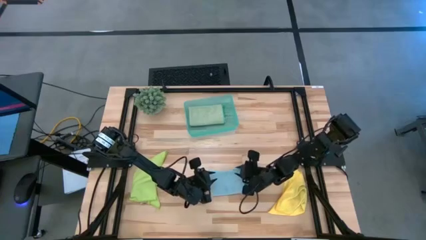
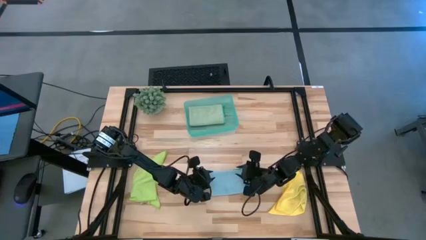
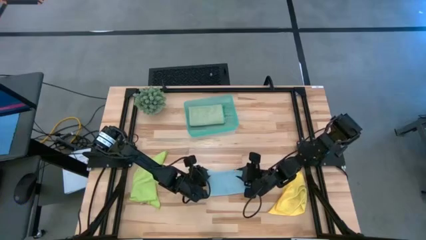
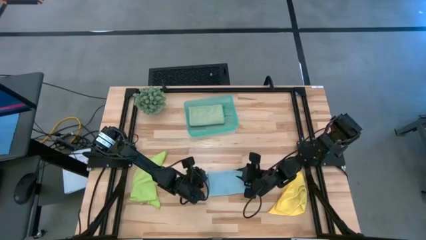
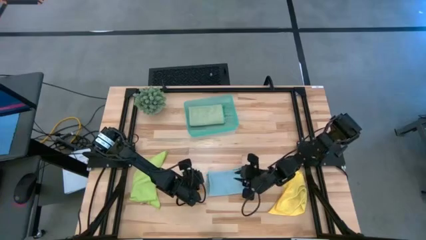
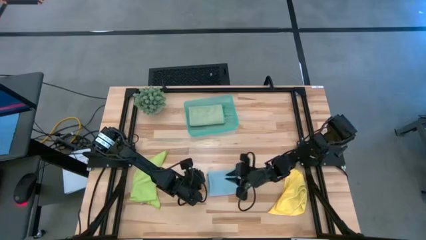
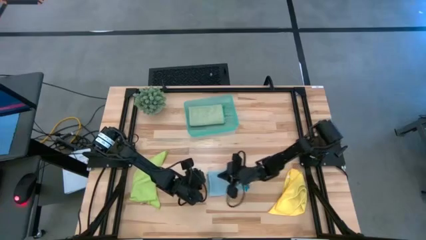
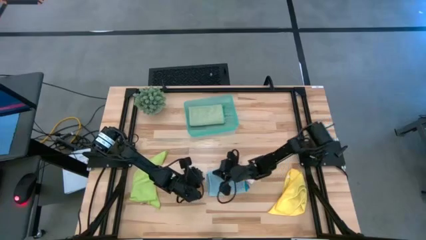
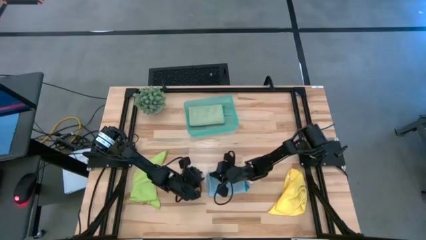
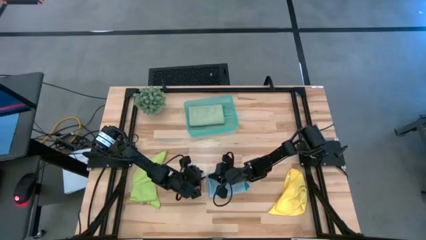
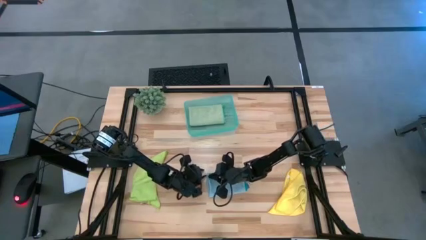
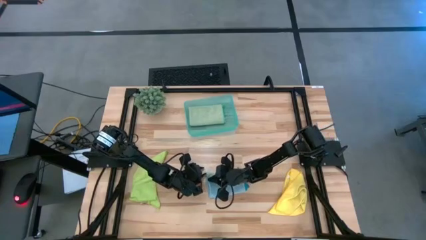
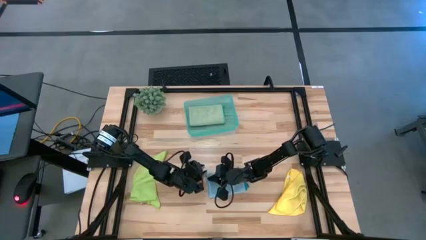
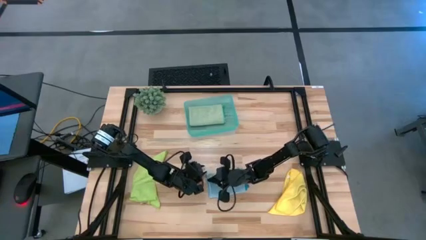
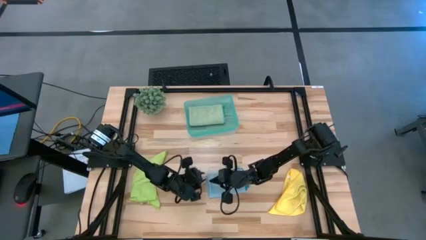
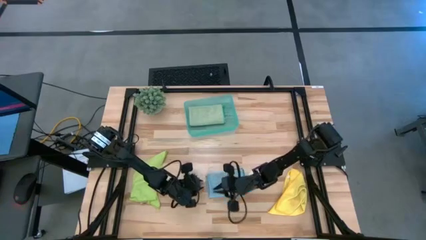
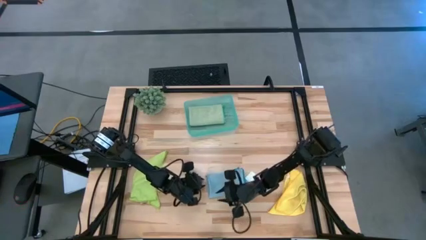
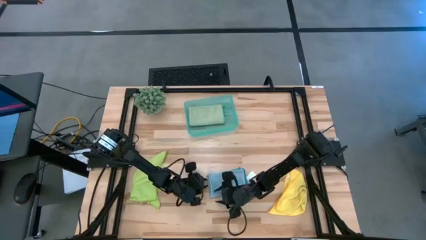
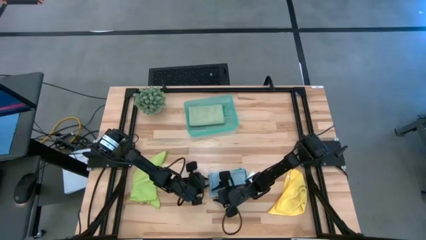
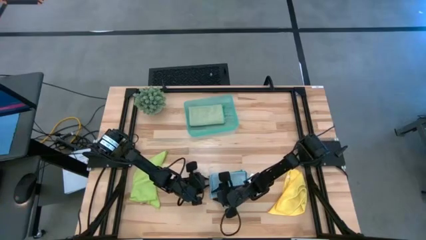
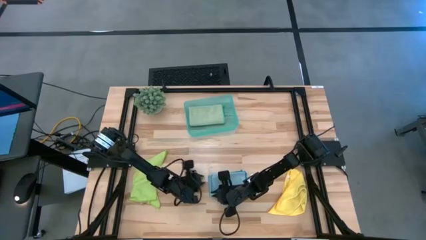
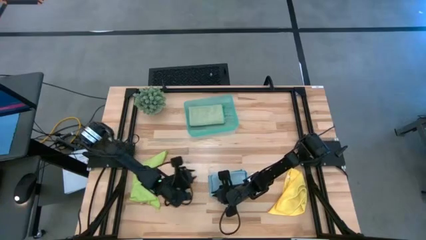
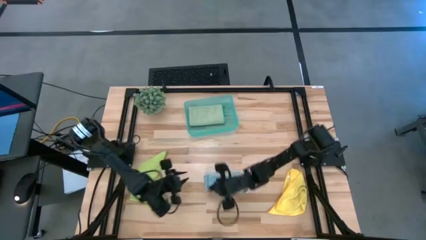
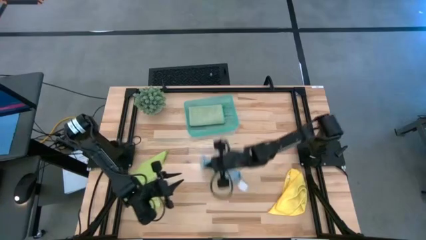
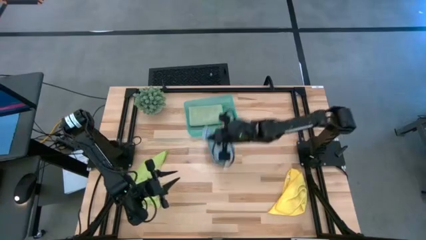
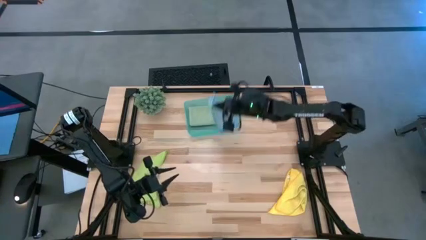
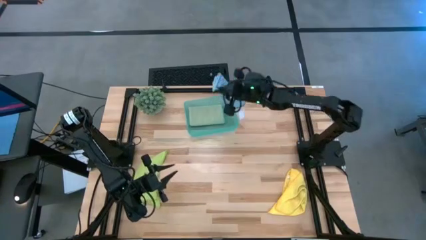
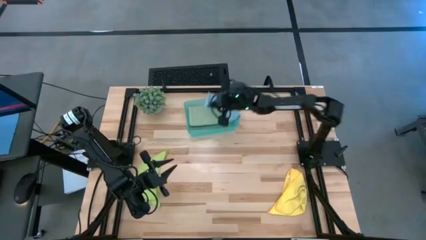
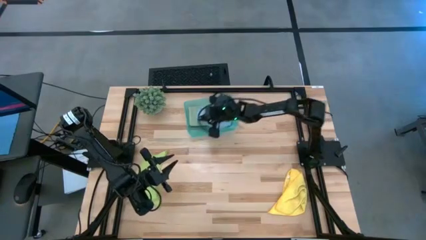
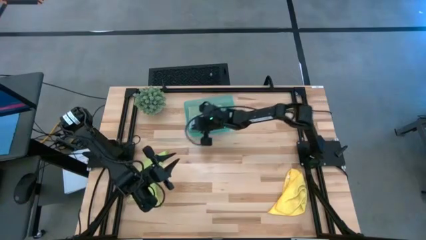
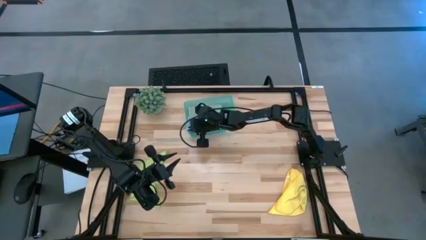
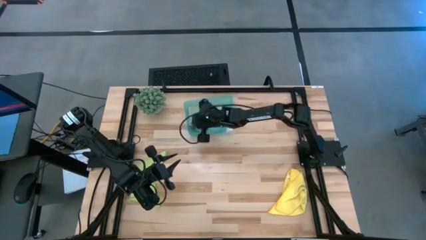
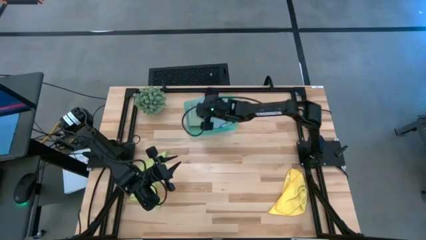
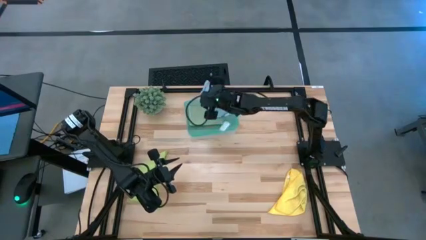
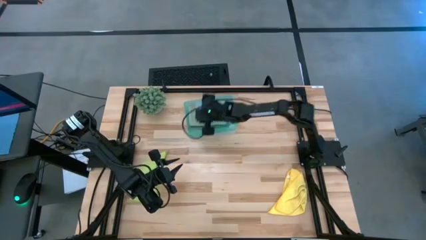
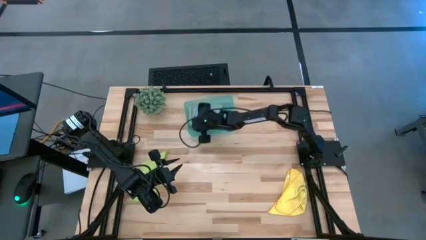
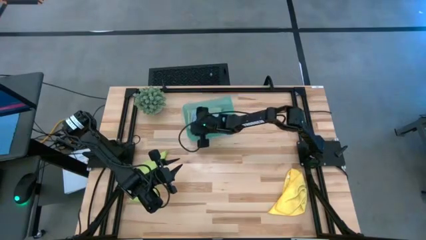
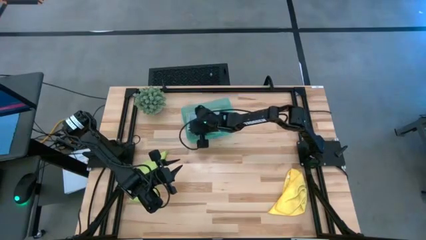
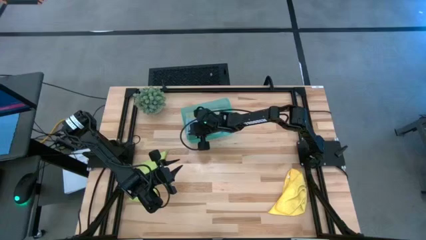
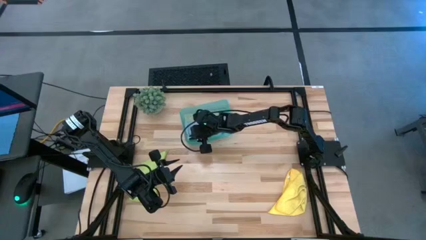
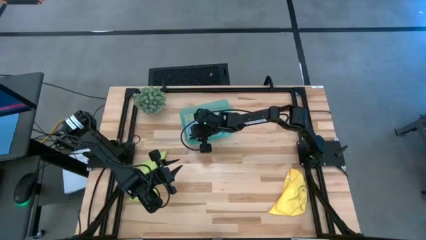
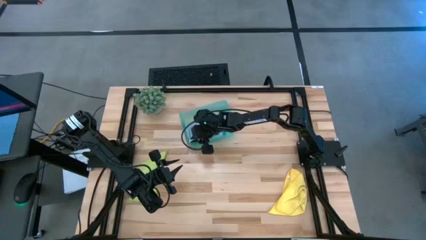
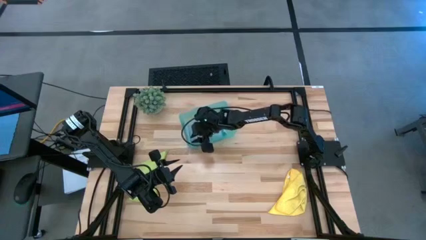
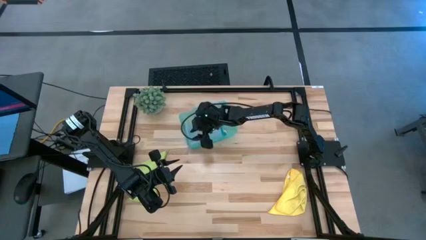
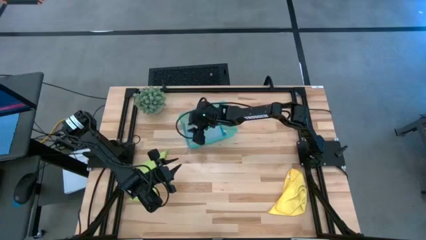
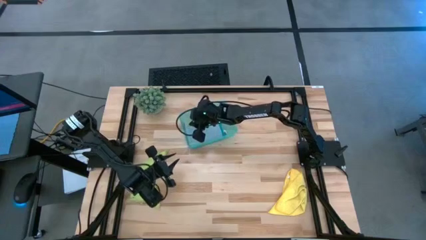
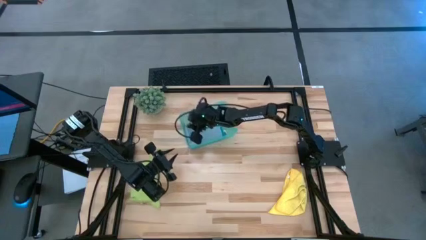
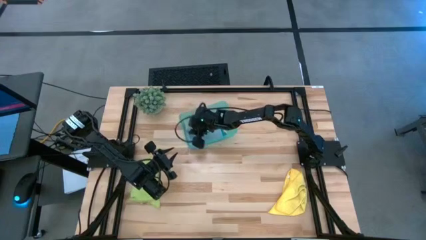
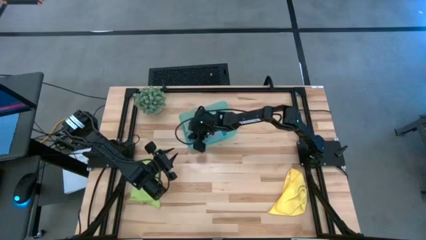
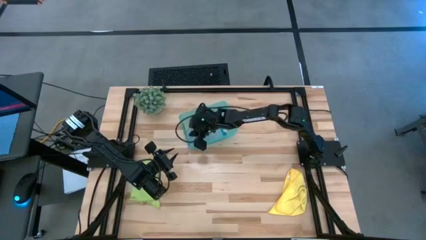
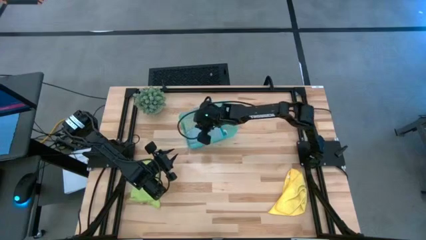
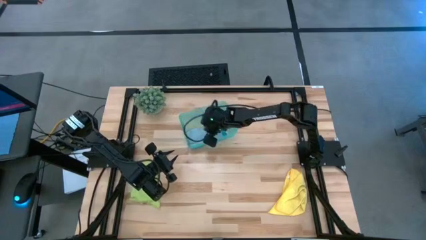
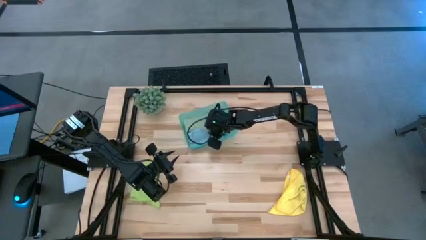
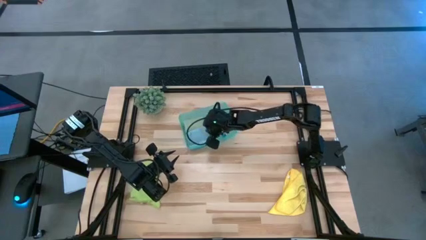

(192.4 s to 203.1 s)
Task: Fold microfiber towels
Put the blue towel into the bin

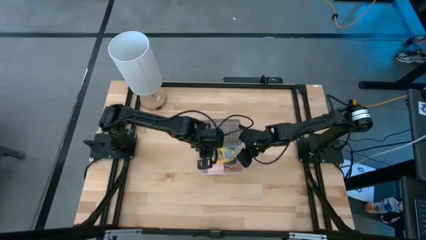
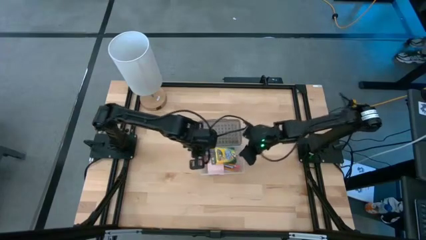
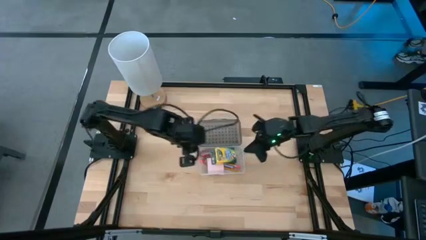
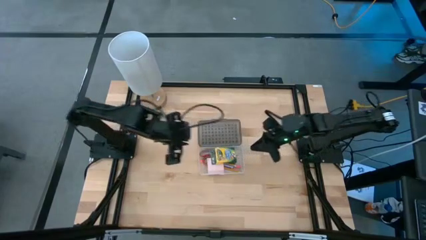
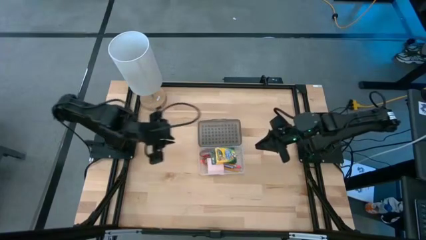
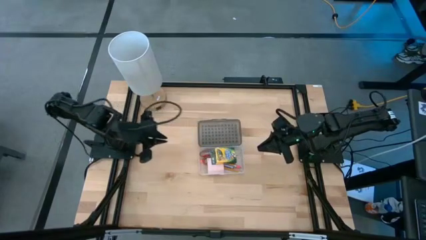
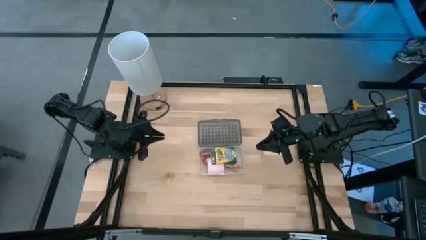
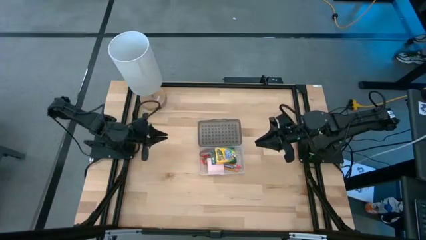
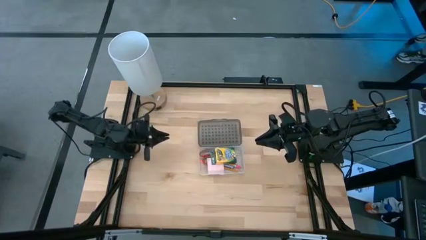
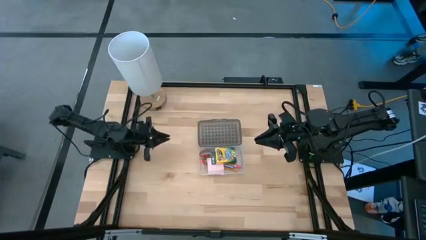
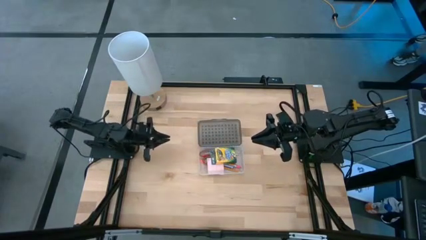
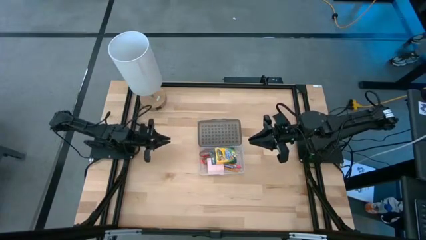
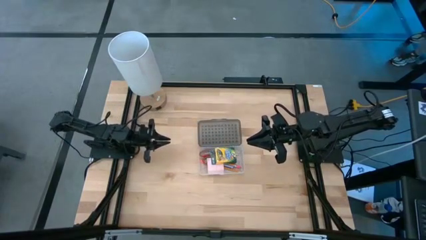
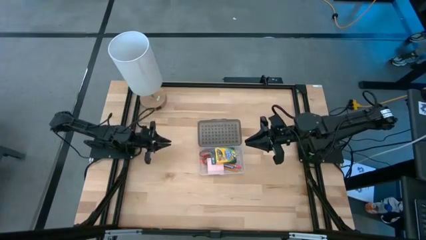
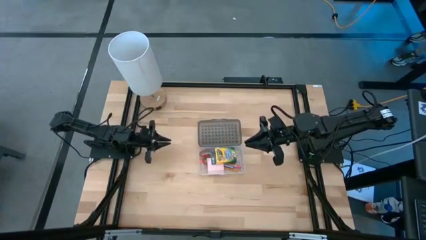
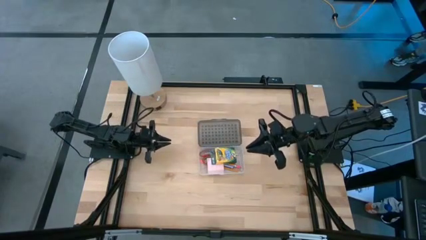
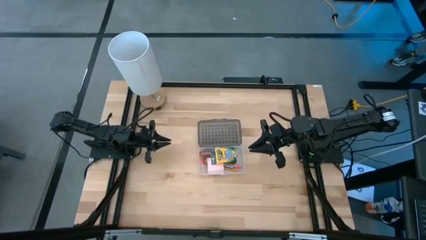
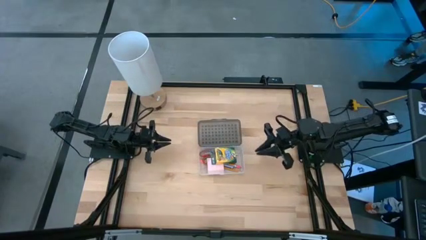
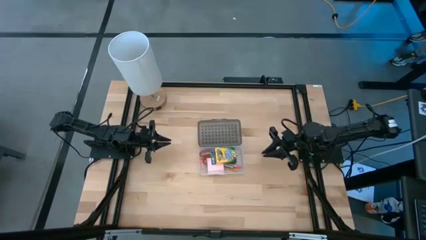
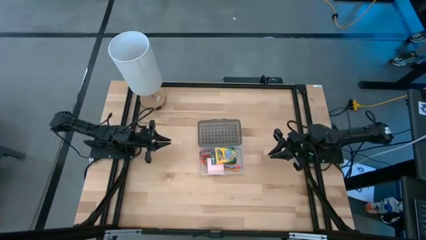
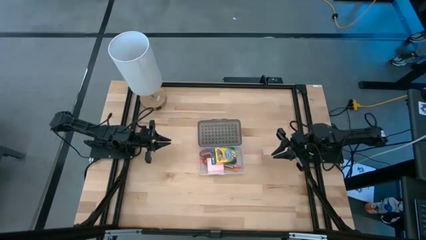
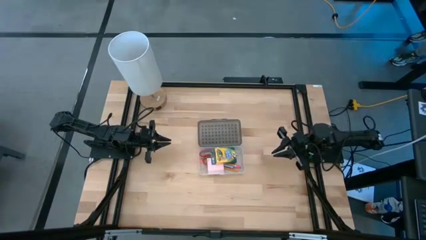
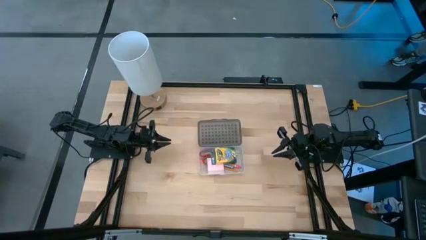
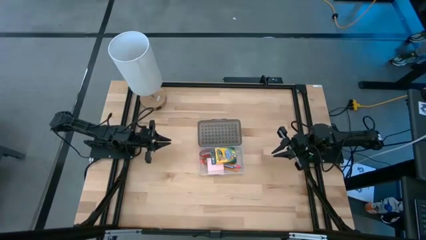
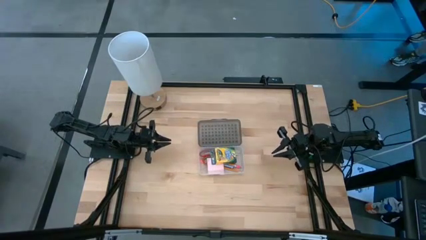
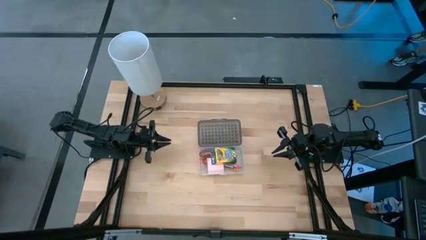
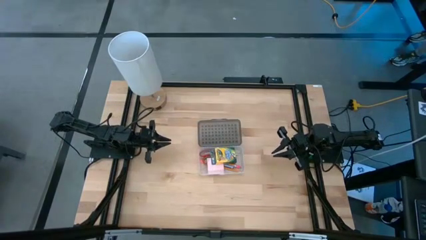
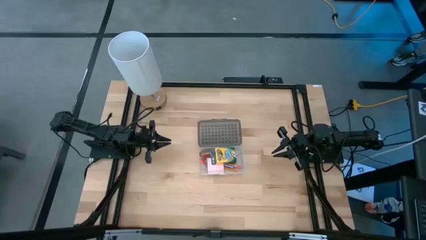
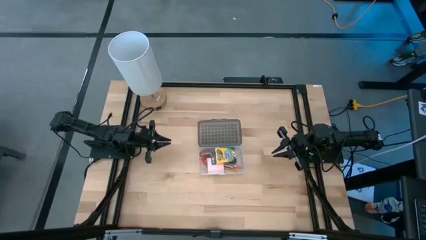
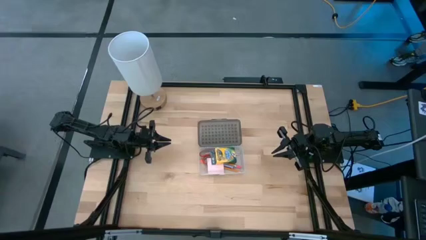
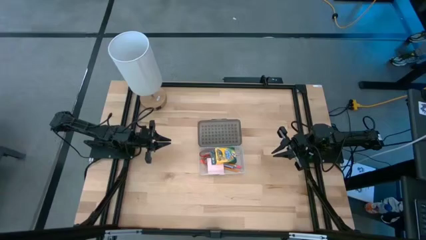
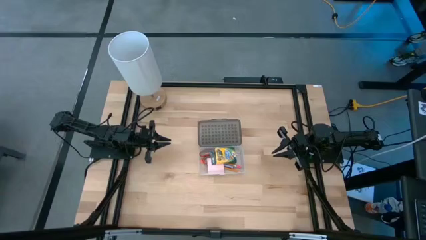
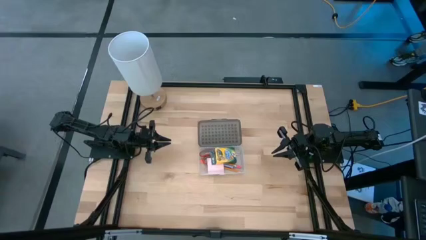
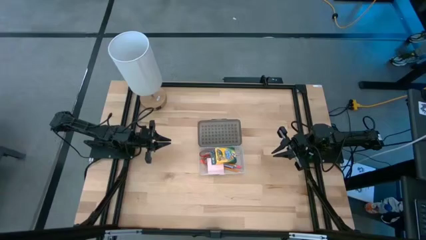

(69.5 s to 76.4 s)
Task: Pack school essentials
Return to Home Position
